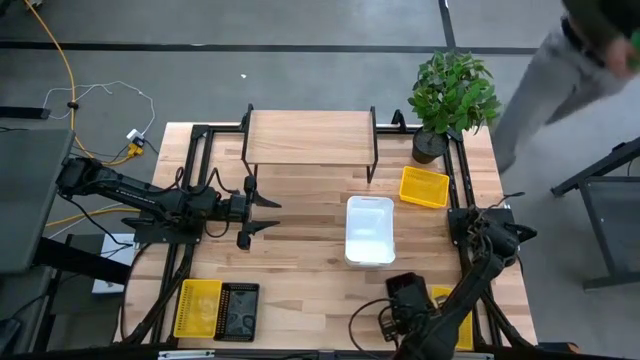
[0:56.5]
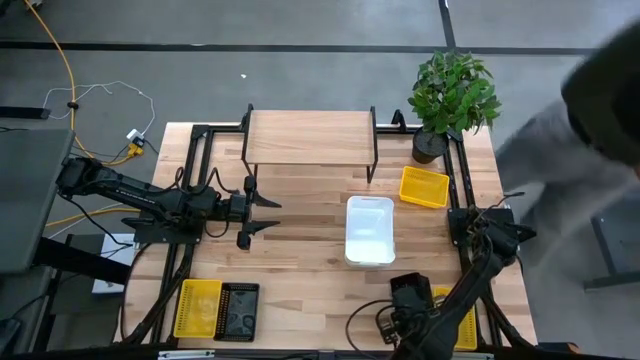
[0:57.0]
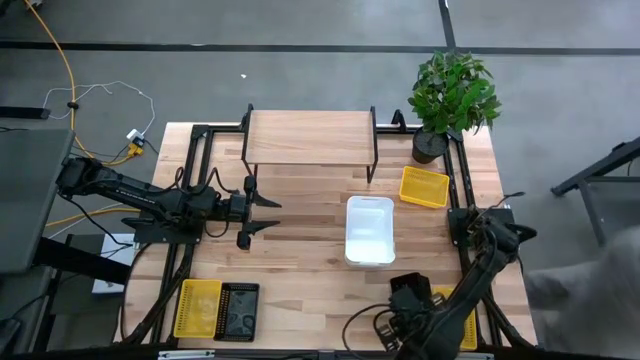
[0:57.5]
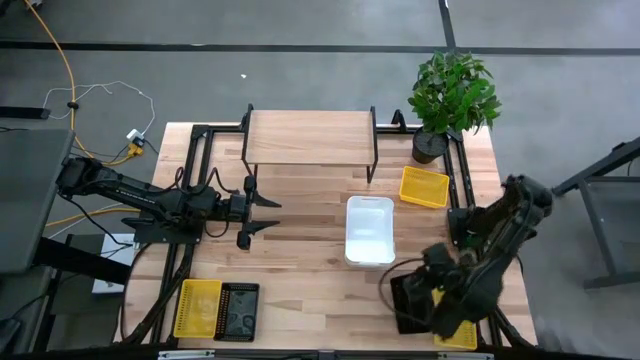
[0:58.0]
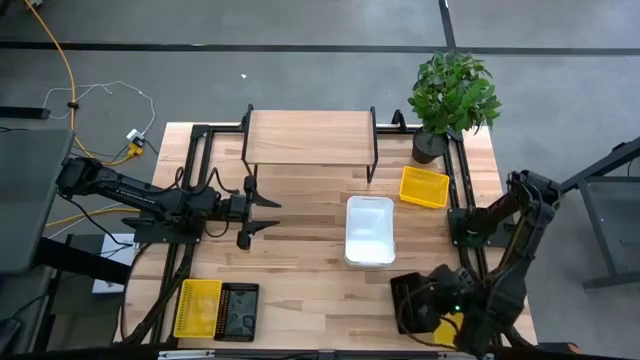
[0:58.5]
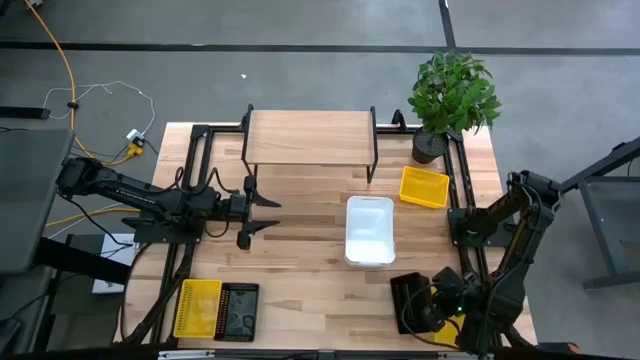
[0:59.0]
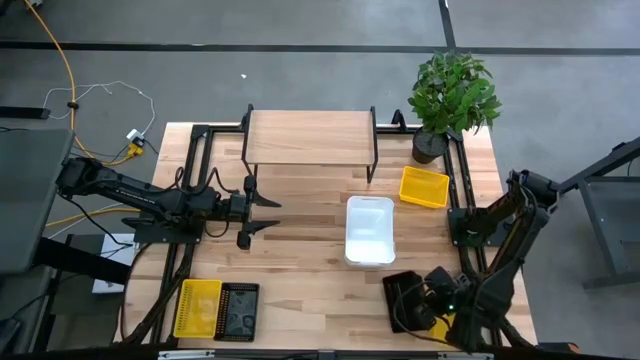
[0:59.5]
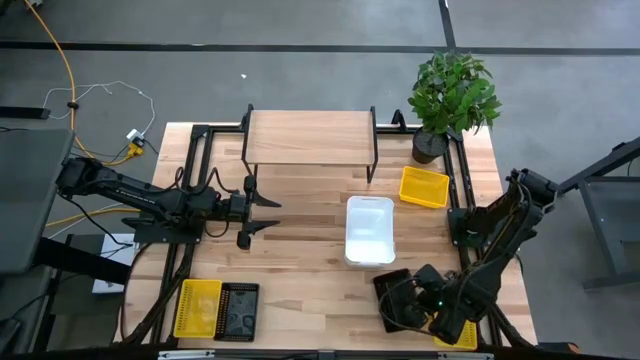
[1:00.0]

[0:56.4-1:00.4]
Task: Stack baskets on shelf by color
Stack the top right black bin on the bottom right black bin

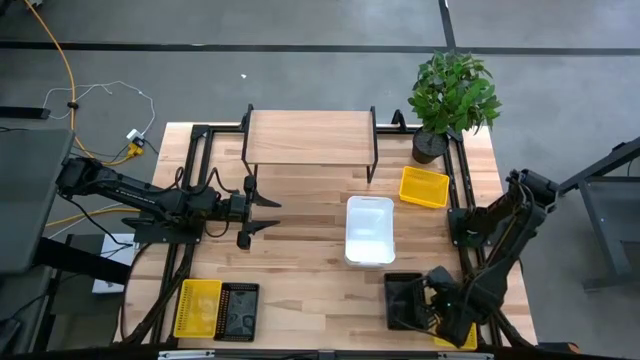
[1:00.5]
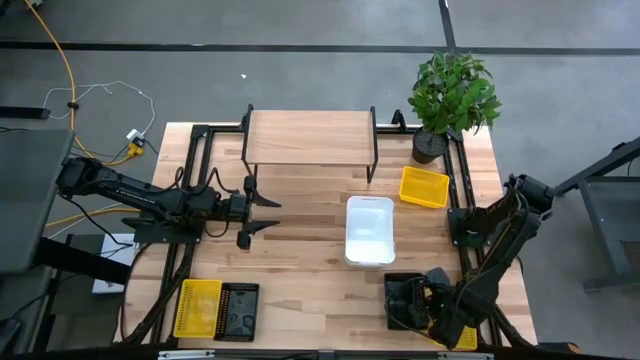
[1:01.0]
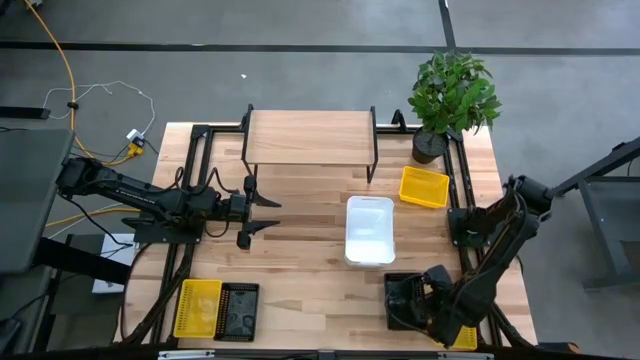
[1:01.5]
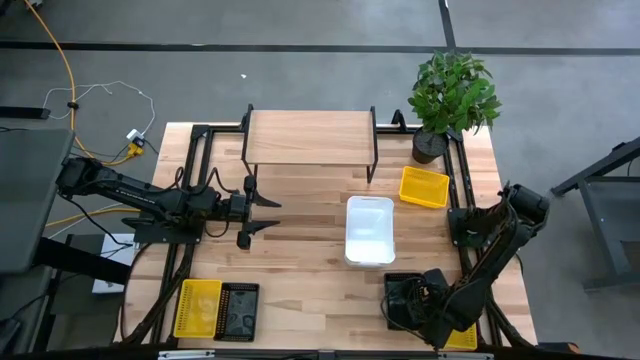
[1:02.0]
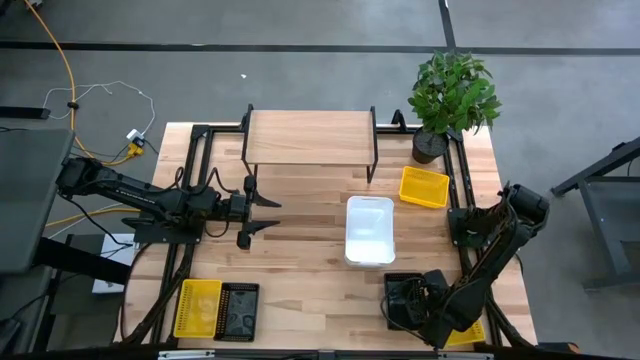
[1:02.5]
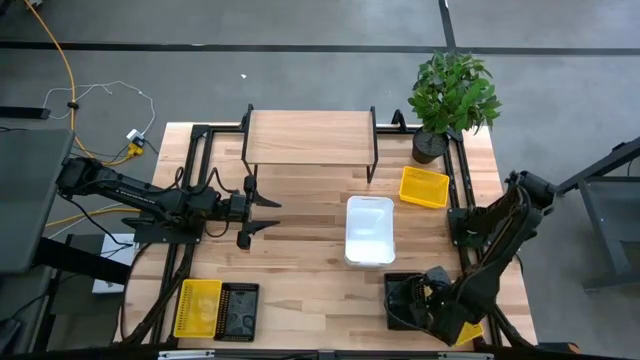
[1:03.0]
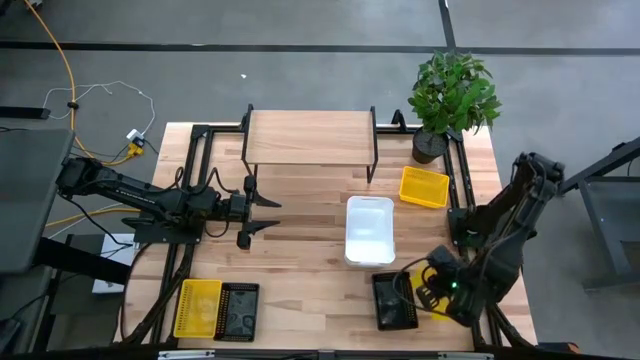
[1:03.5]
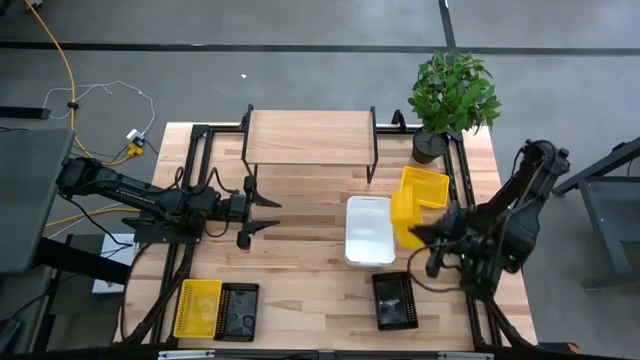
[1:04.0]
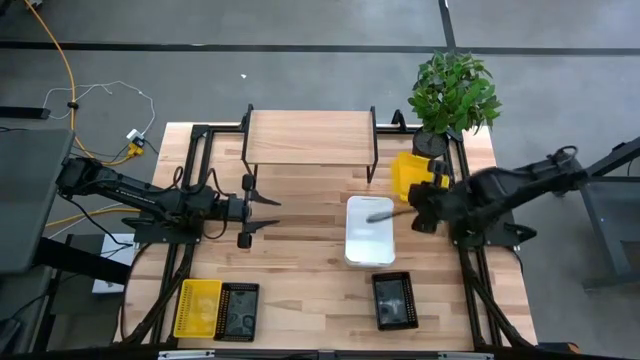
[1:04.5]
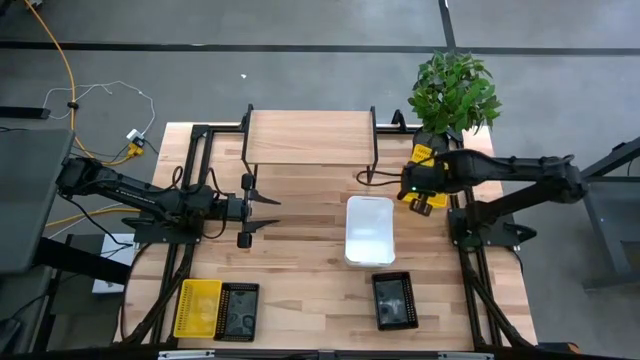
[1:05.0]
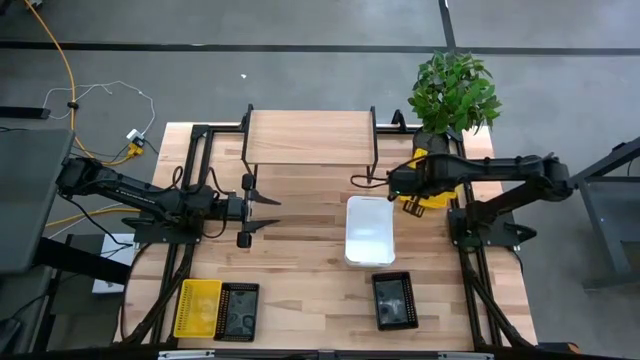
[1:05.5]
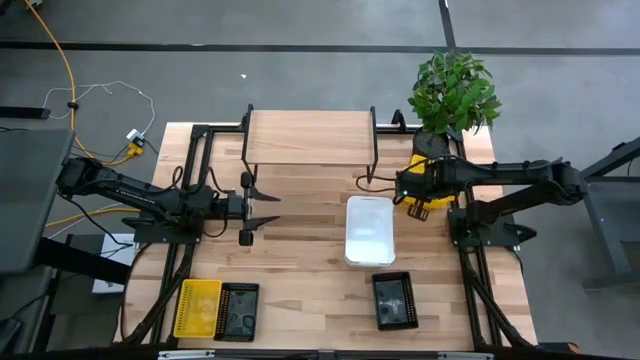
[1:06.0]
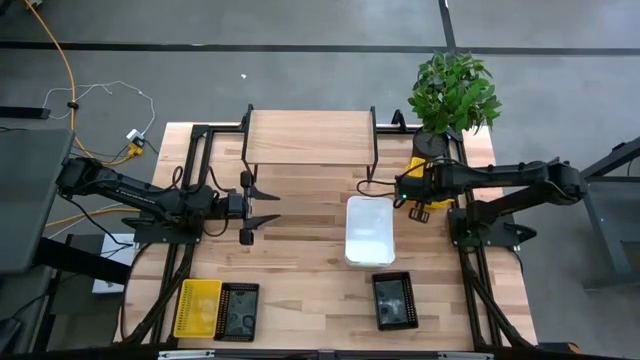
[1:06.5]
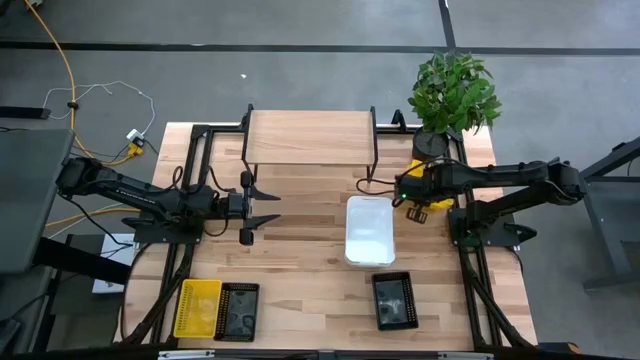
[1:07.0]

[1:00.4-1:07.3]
Stack the bottom right yellow bin on the top yellow bin

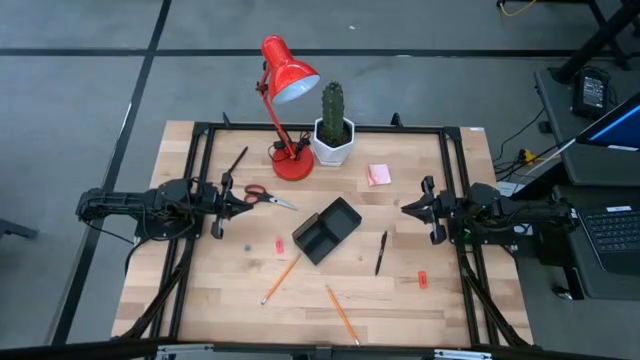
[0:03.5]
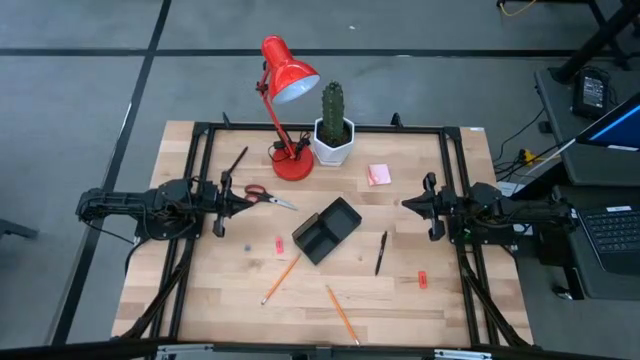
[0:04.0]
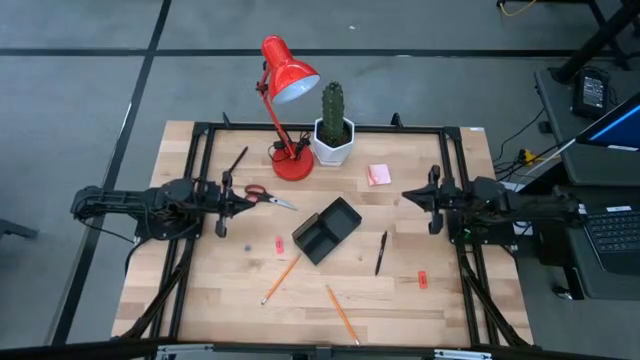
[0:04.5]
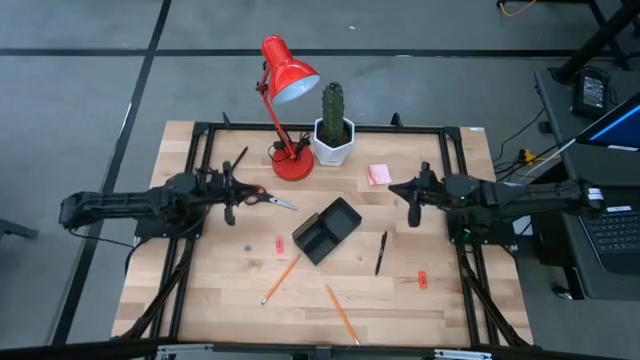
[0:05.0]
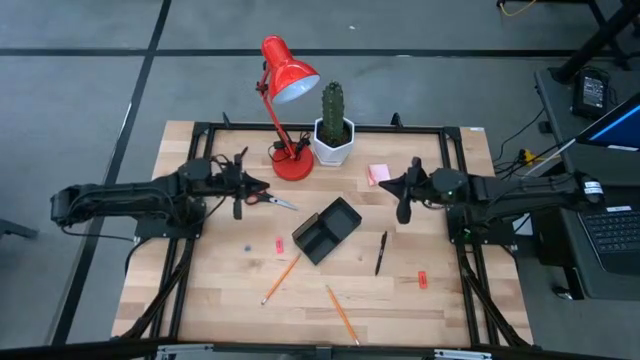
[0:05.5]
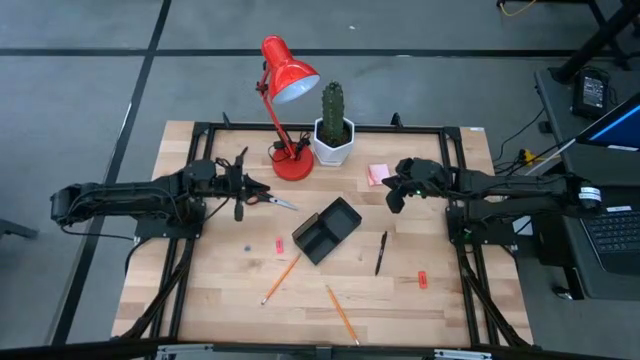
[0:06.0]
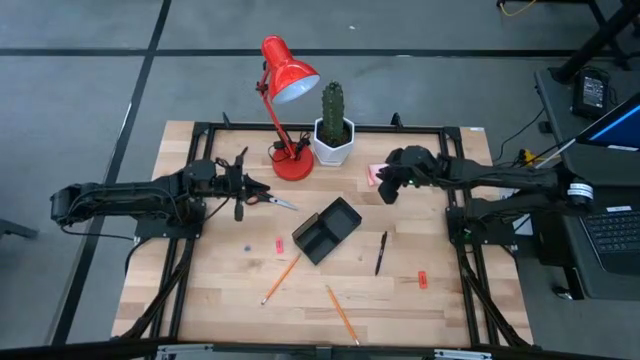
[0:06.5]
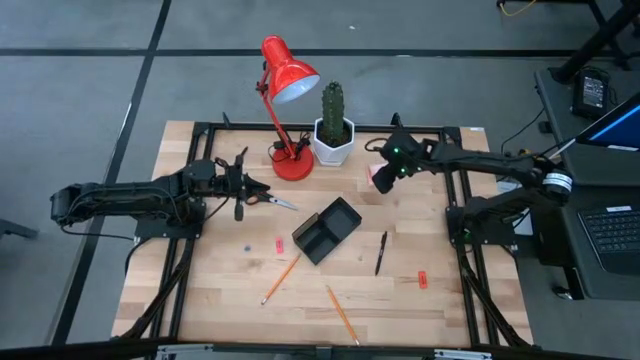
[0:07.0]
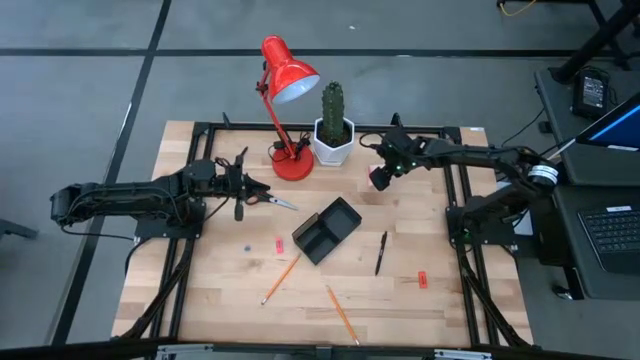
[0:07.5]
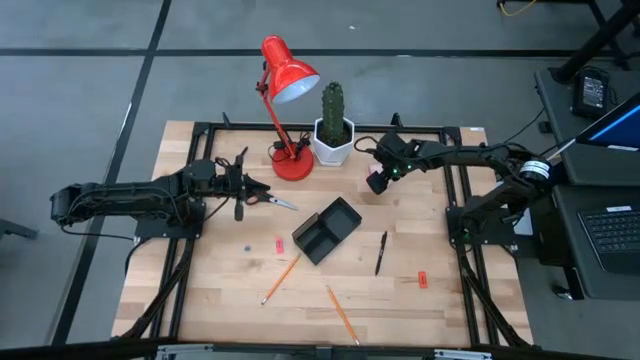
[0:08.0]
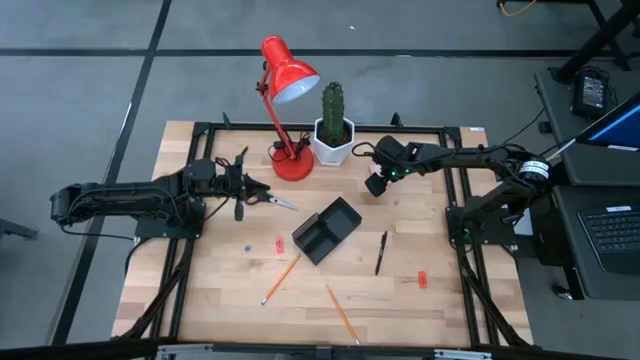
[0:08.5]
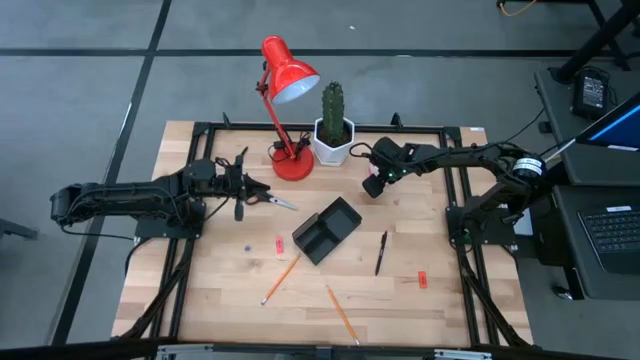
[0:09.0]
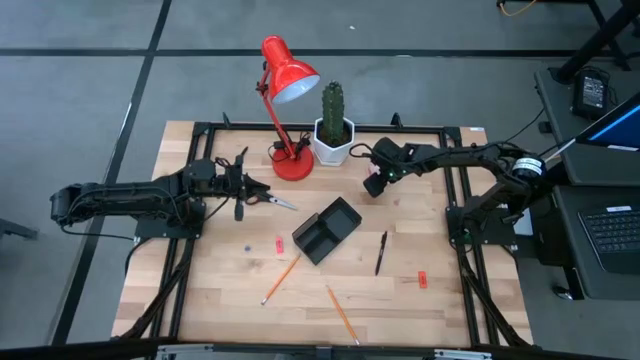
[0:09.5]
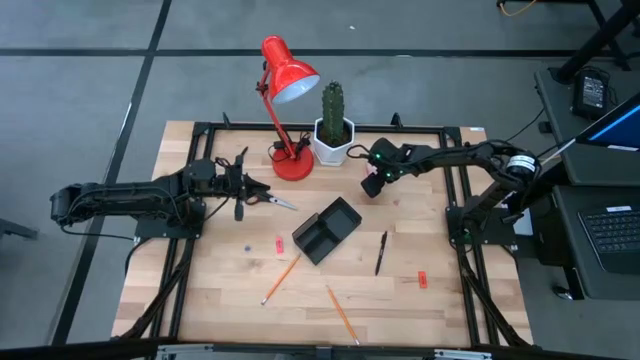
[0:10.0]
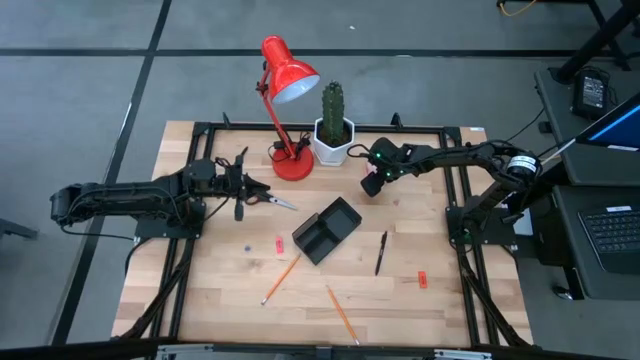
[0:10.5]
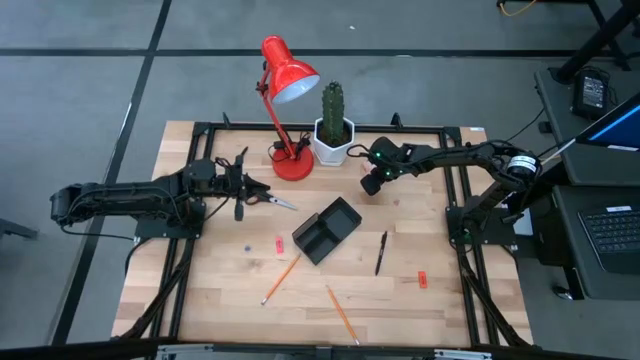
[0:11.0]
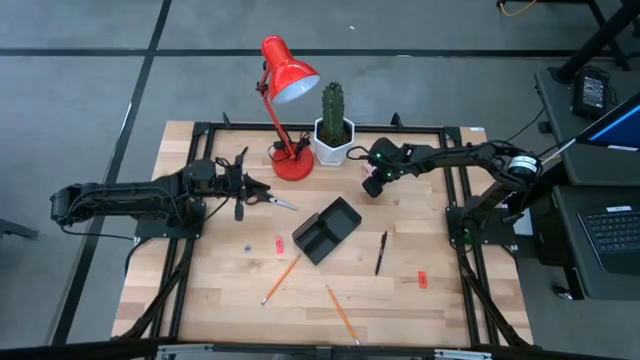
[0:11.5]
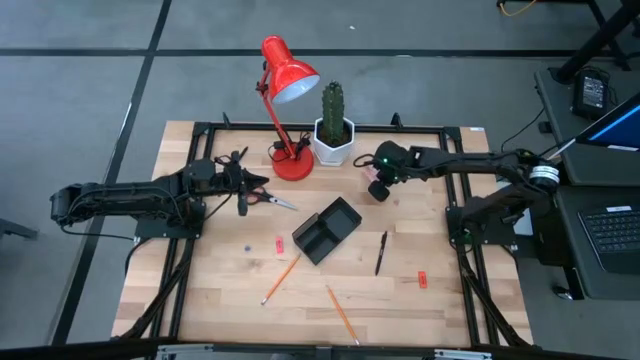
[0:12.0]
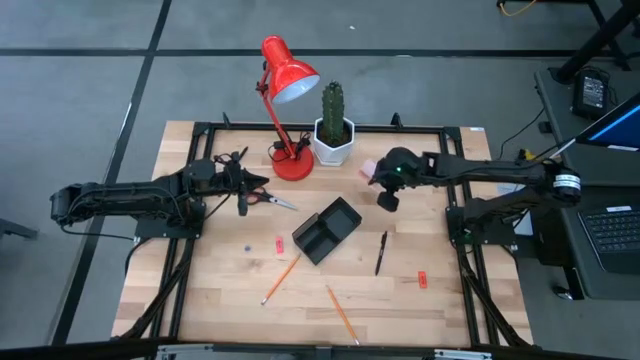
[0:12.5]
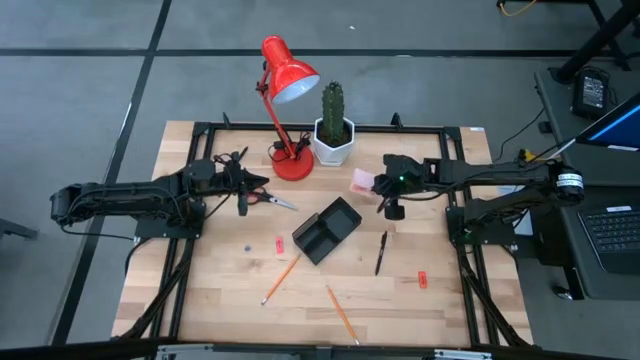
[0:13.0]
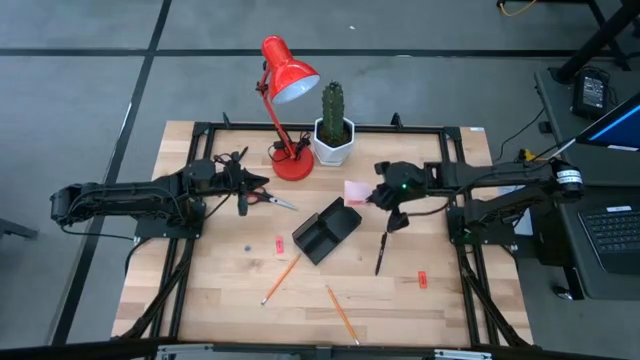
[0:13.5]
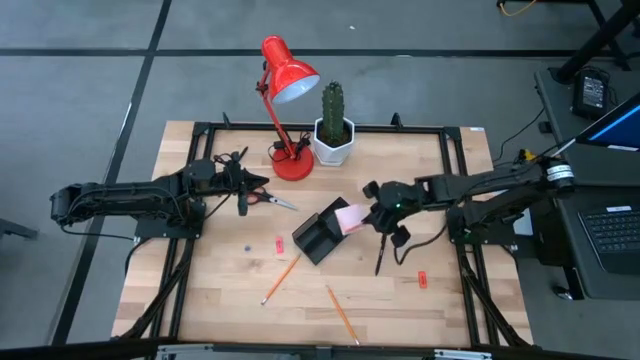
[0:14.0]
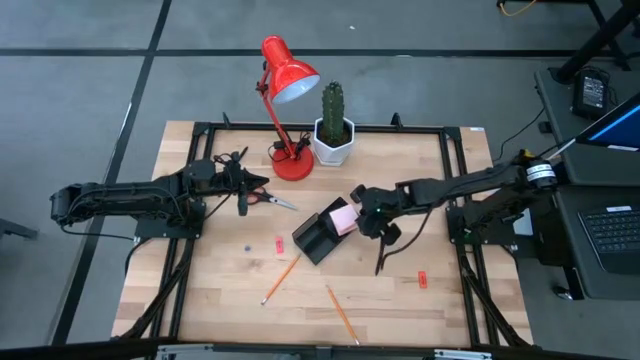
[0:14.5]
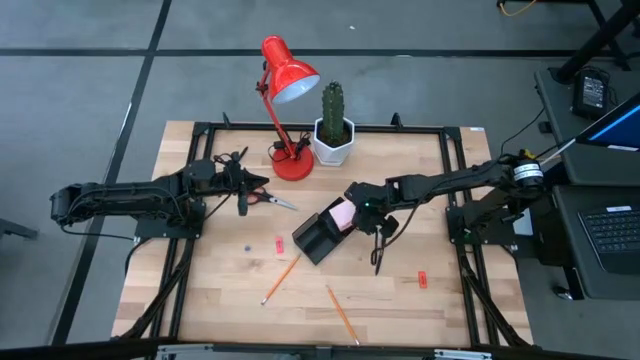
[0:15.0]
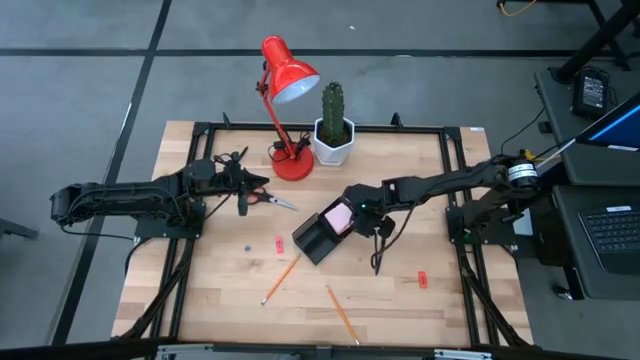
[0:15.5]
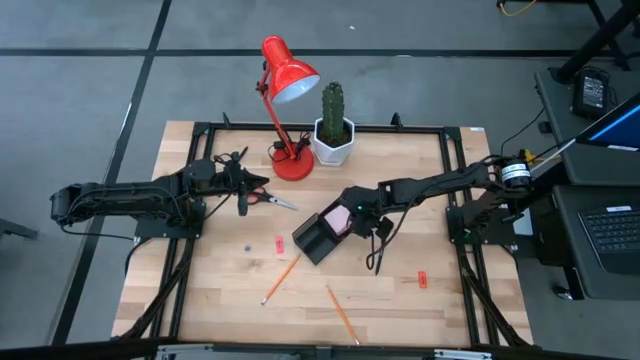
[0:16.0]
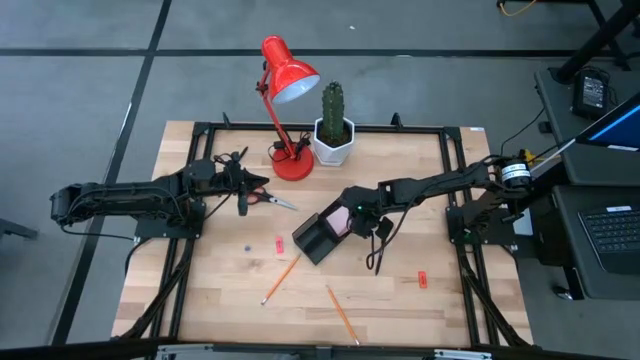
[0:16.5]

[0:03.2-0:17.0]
Task: Pick and place office supplies into organizer
Put the pink sticky notes into the black desk organizer
